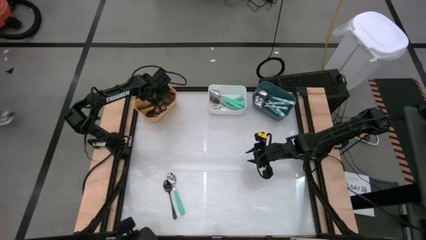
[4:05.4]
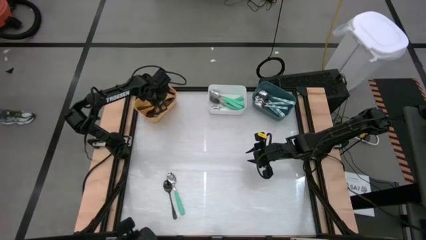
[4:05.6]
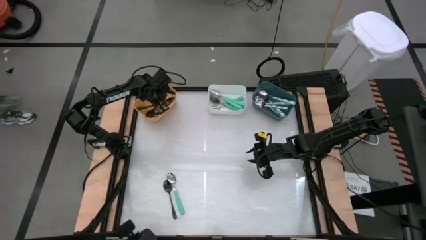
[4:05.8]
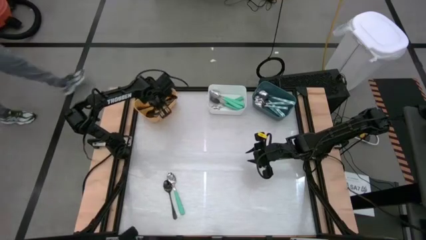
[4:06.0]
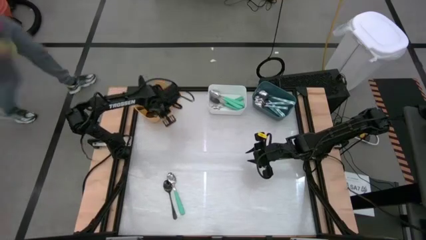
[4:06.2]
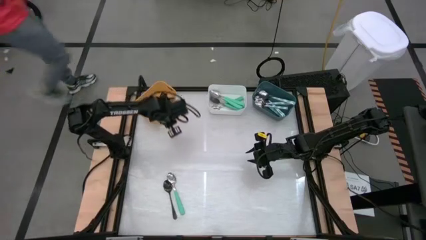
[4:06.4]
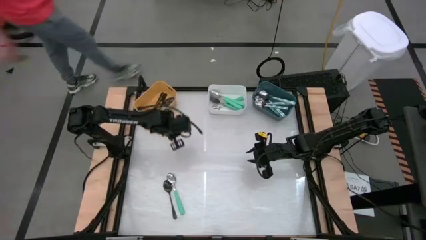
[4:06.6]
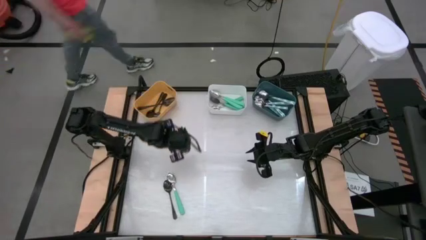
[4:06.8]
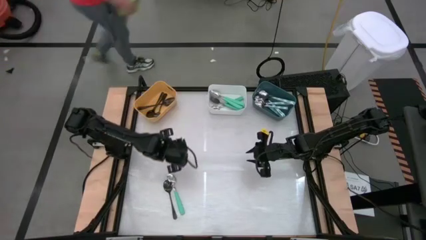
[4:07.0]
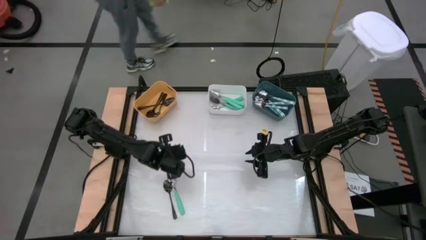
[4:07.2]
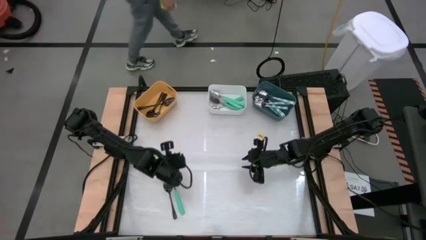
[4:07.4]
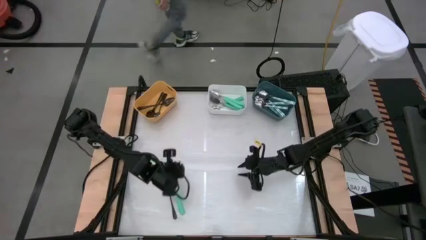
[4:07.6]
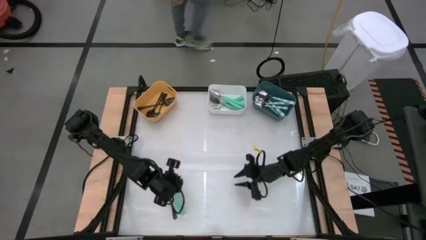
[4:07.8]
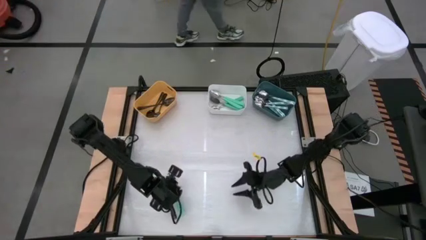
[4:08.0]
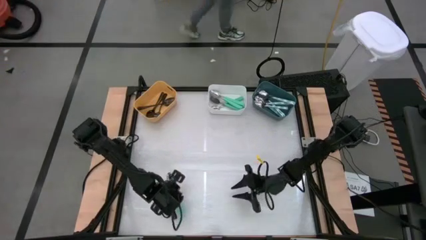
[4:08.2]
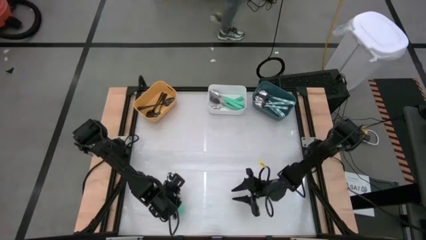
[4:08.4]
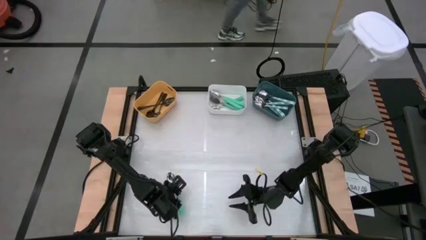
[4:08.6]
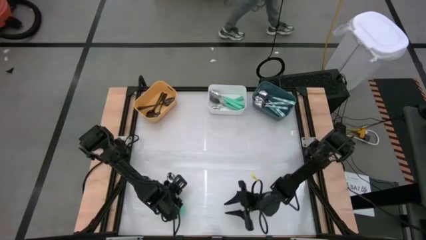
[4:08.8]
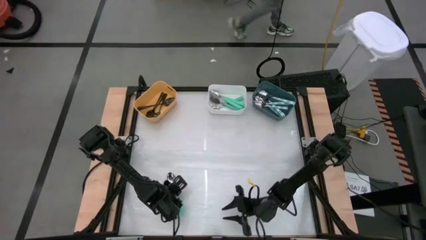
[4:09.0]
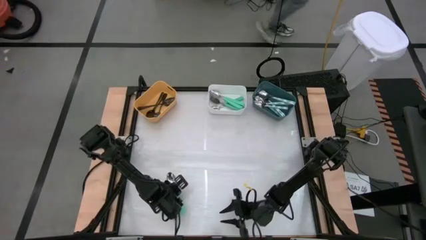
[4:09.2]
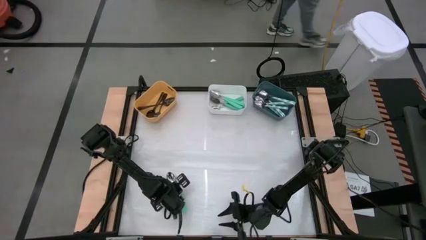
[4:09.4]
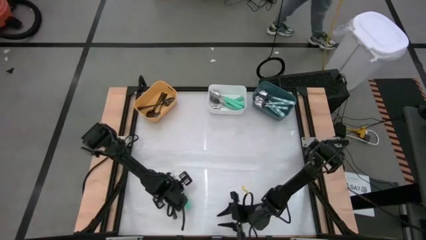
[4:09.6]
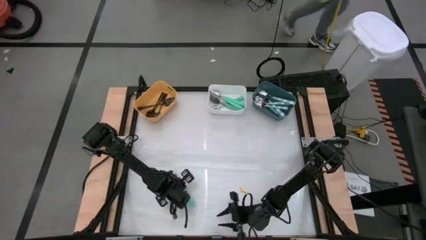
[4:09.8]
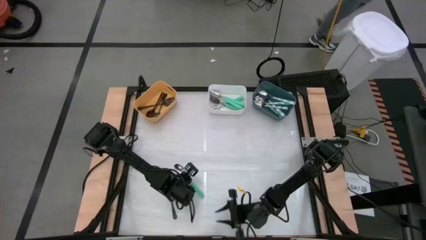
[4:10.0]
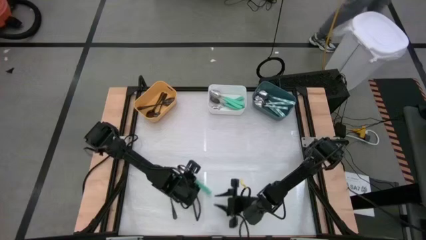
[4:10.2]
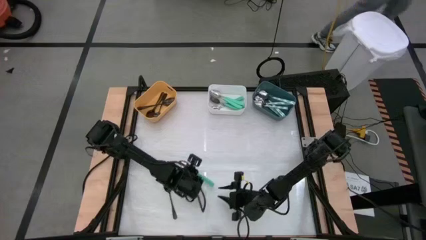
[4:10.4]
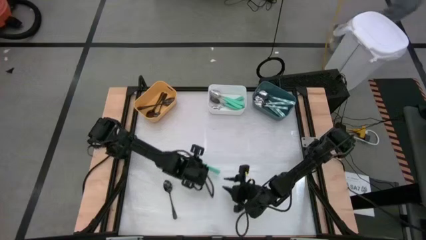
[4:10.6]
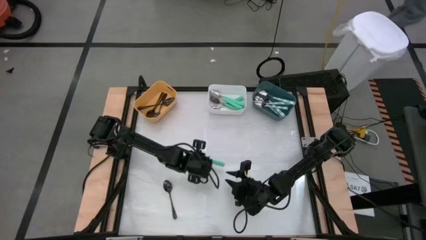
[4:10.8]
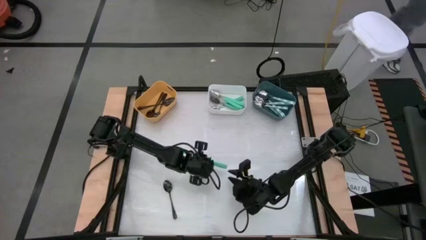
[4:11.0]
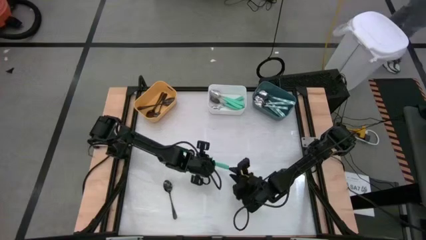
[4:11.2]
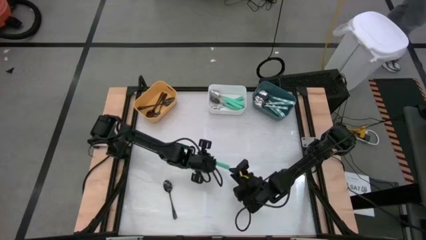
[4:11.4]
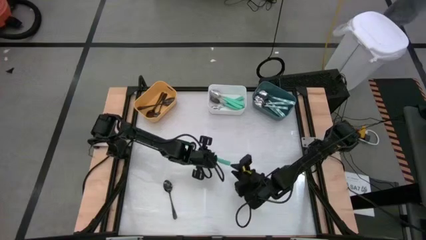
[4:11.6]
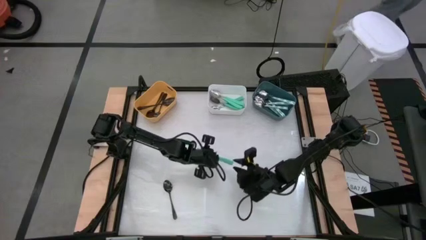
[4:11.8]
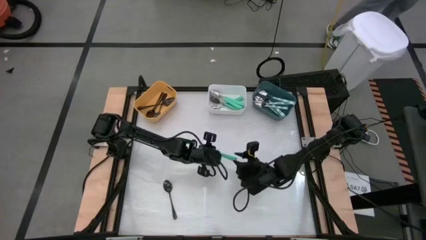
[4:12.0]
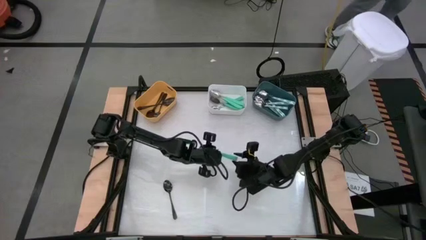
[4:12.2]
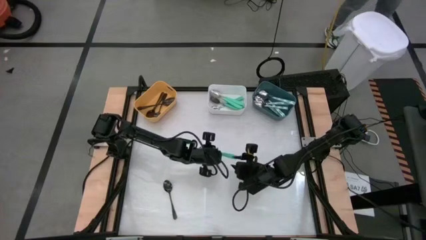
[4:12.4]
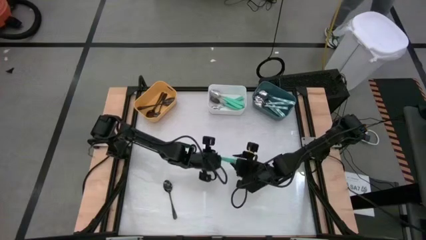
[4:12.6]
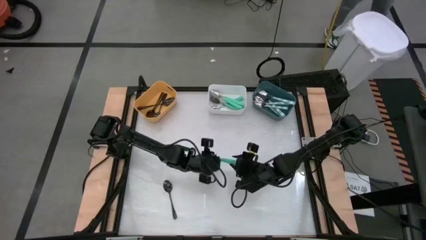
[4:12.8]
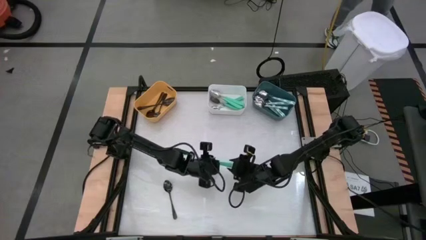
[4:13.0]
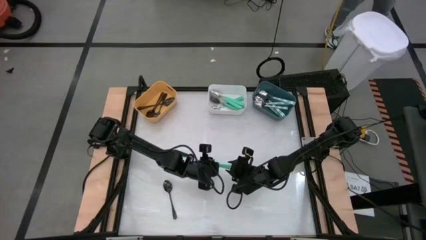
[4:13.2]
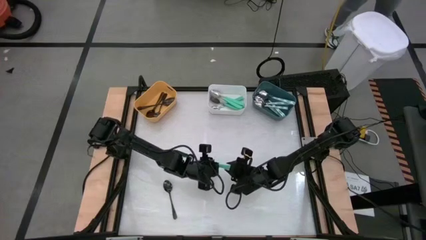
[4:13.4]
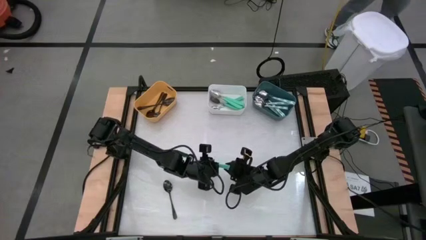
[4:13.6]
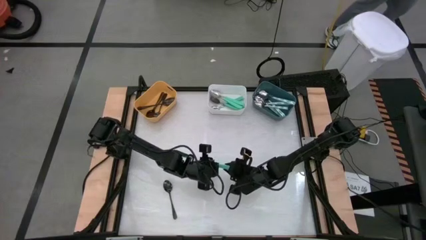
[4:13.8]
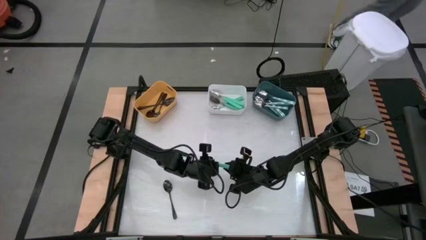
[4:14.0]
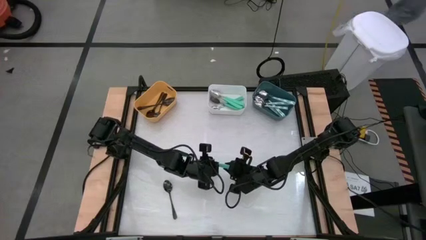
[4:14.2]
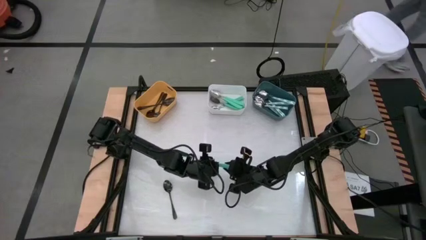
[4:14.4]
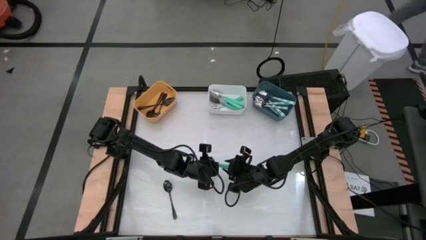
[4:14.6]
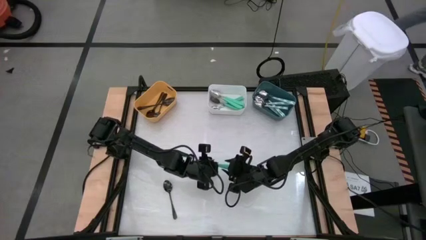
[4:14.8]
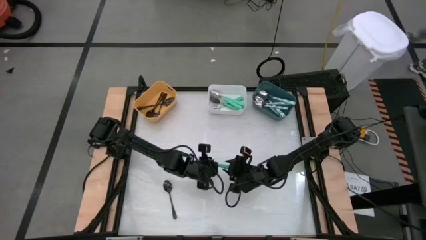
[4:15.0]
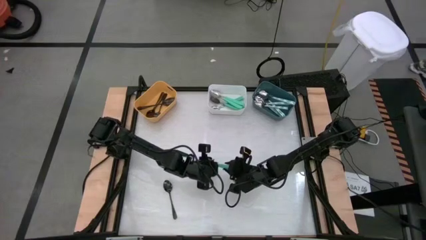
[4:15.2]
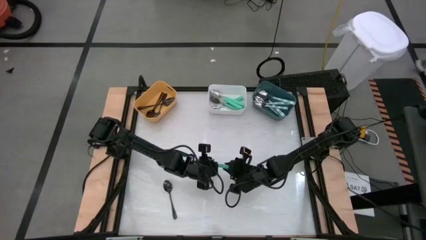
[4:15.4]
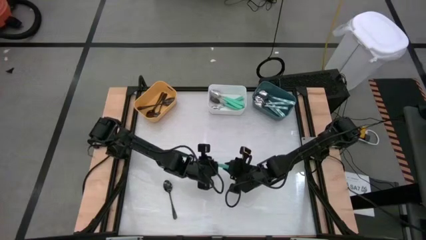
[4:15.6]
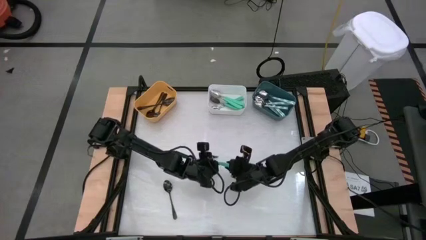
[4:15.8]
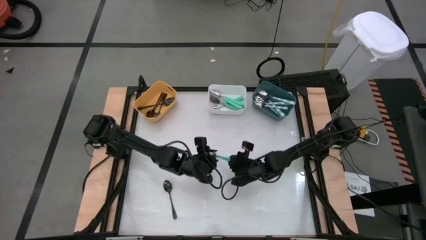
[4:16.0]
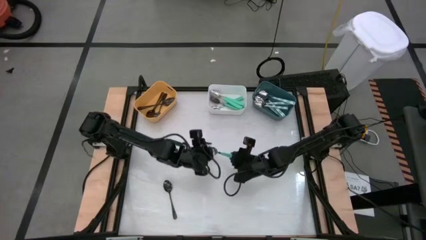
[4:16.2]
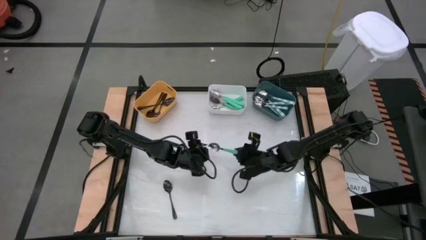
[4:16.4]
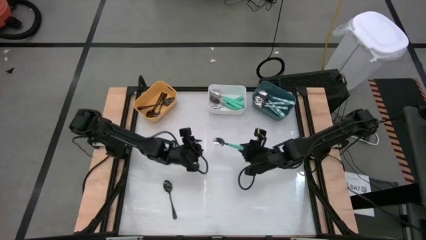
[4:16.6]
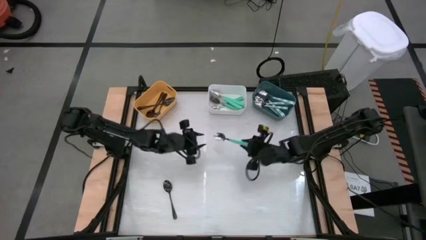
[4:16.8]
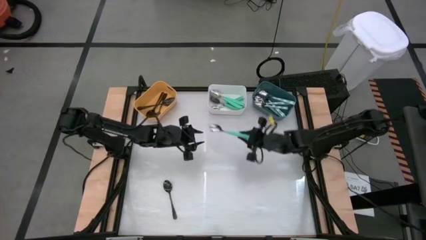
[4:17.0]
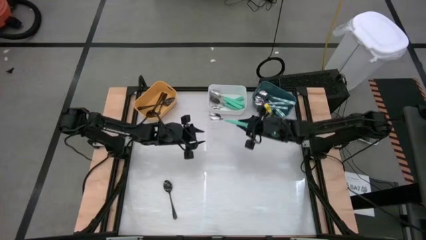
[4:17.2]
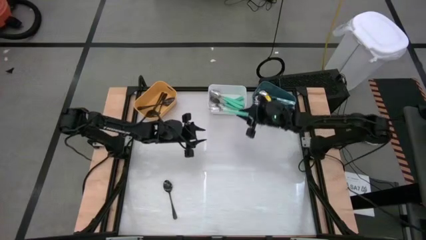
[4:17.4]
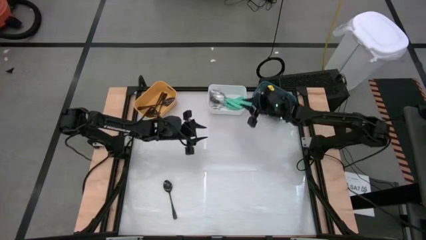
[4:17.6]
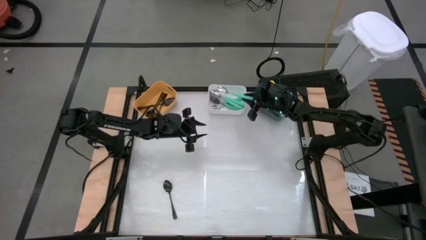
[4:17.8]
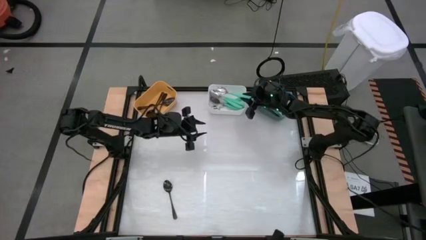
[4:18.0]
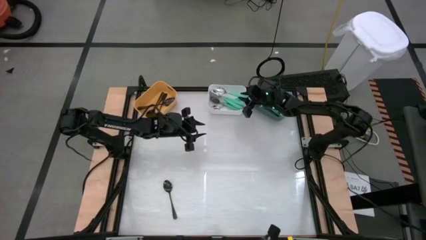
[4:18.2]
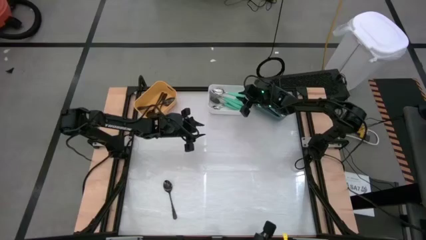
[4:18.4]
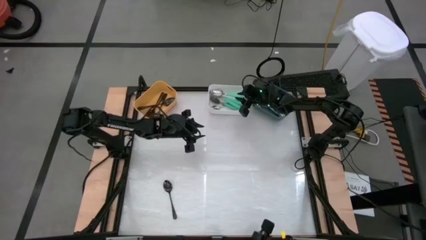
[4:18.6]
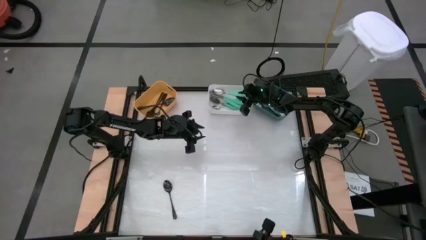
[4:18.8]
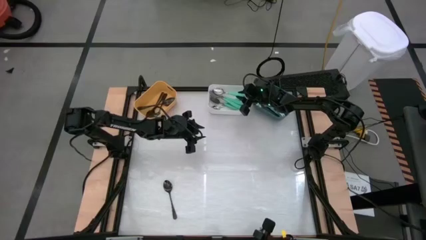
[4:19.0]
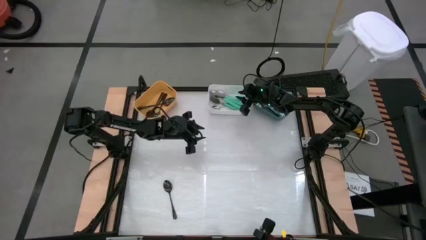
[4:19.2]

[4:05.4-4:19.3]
Task: Sort silverware by color (type)
Put the blue spoon into the white bin

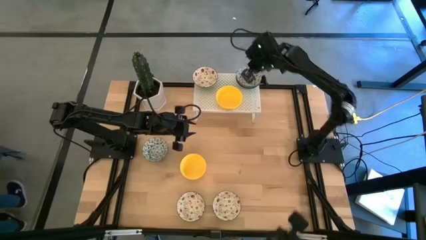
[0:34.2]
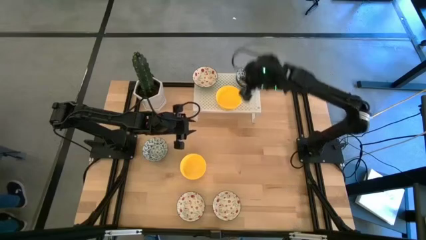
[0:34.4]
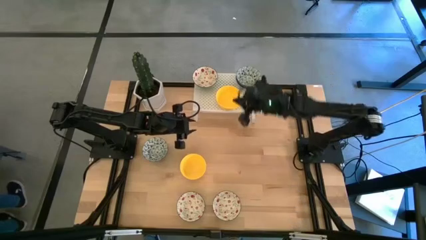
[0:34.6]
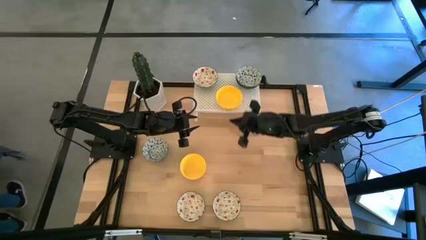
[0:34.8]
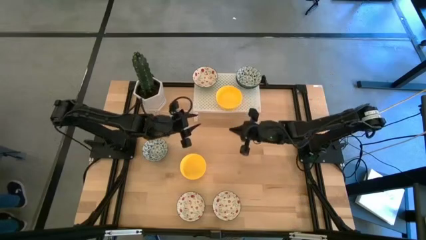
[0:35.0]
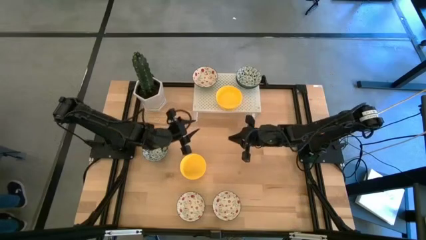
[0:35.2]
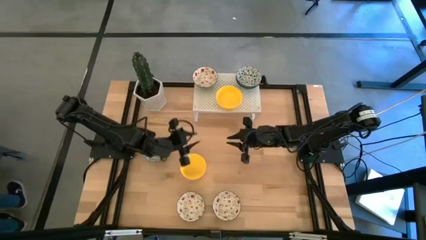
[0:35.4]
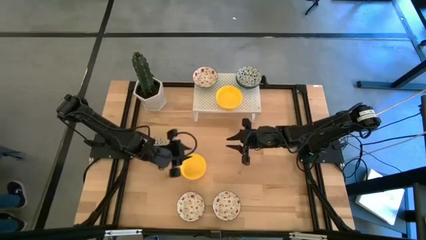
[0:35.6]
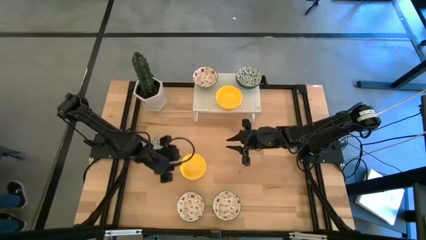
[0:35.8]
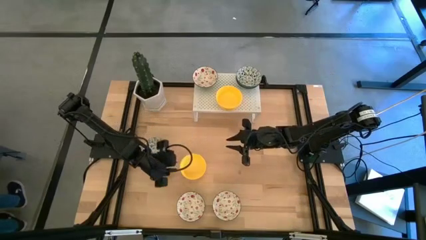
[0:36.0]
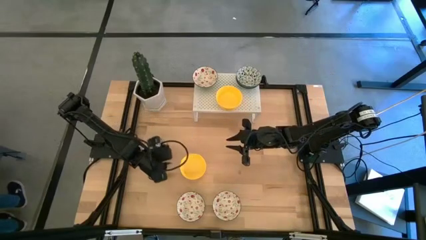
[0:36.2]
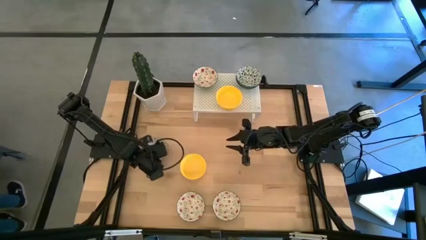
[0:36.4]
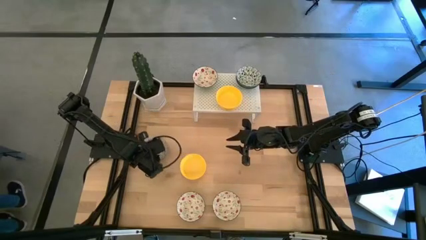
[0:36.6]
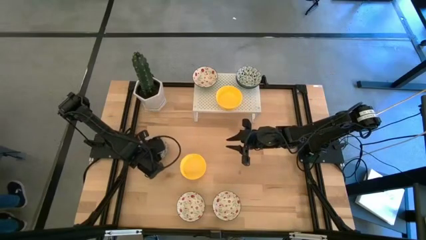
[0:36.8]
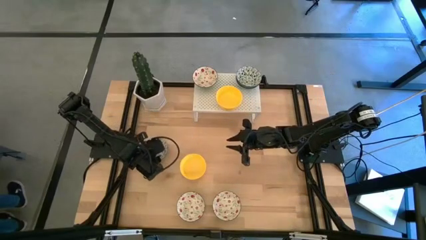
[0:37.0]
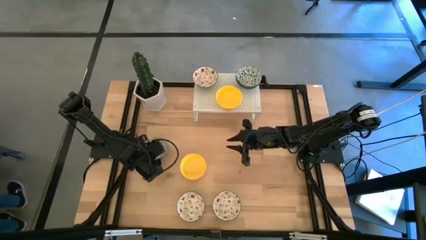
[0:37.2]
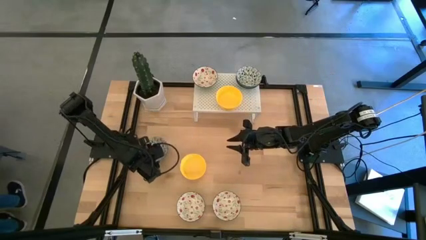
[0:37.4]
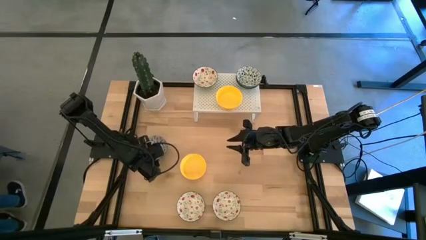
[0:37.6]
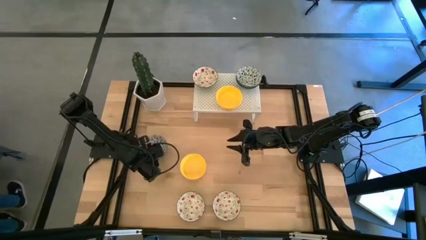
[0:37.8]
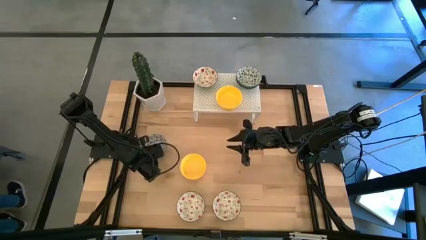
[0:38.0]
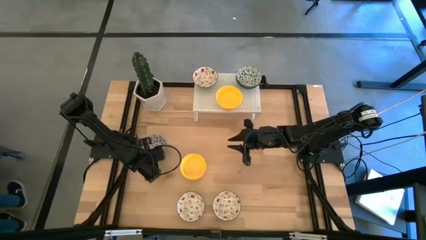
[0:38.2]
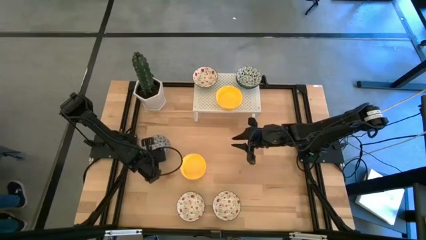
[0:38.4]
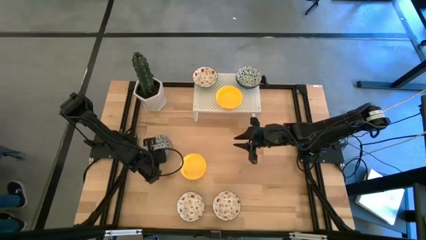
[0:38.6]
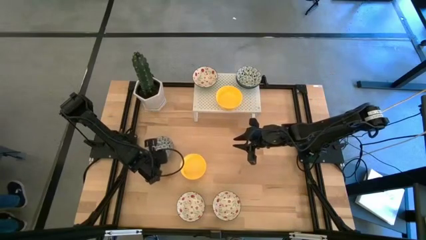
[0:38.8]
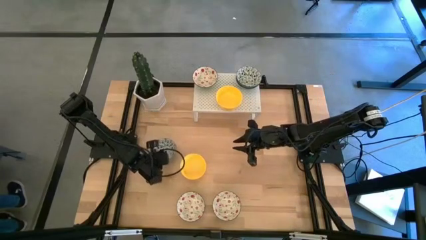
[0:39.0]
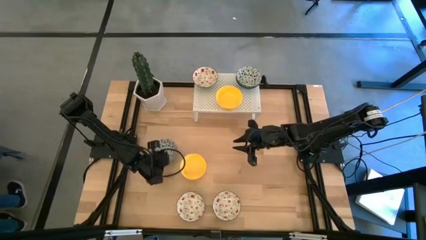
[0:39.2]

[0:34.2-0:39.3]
Task: Pick & Place Mini bowls
Stack the right blue patterned bowl on top of the other blue patterned bowl on the shelf
